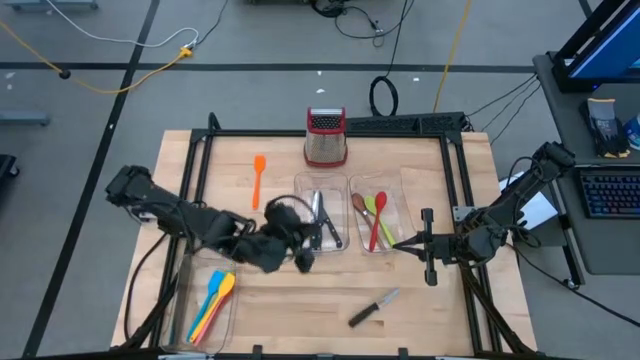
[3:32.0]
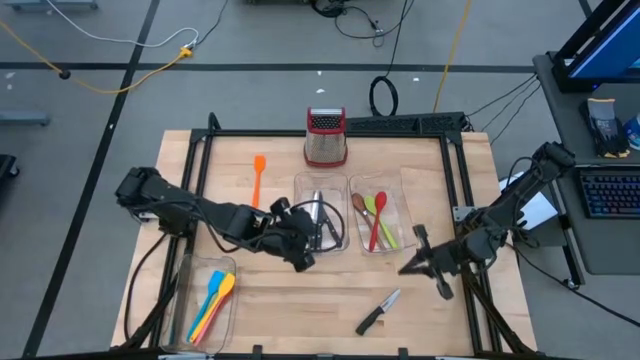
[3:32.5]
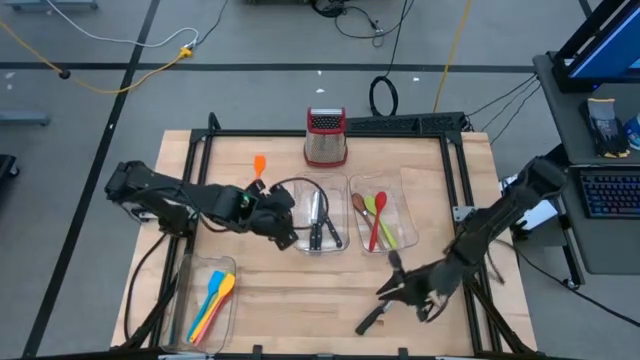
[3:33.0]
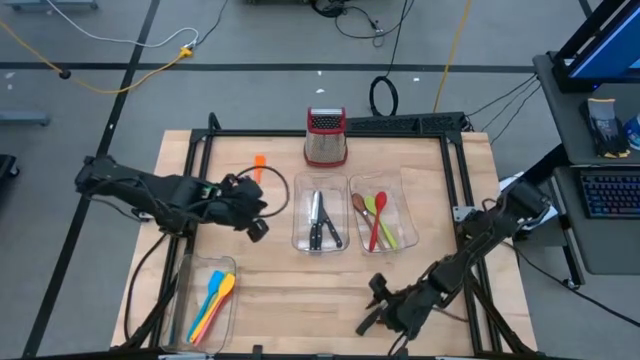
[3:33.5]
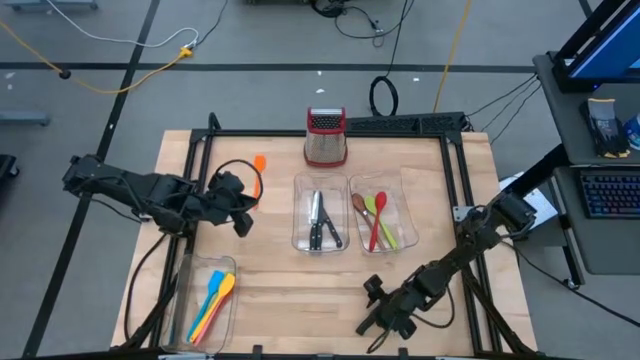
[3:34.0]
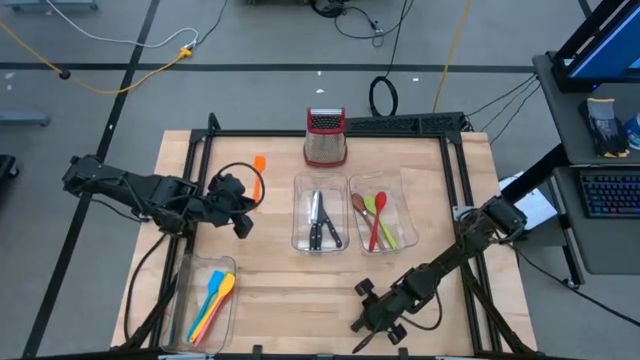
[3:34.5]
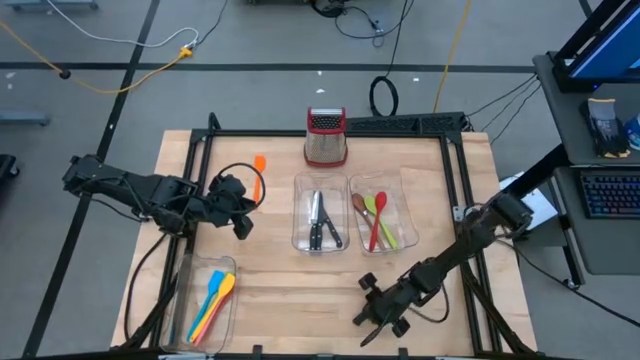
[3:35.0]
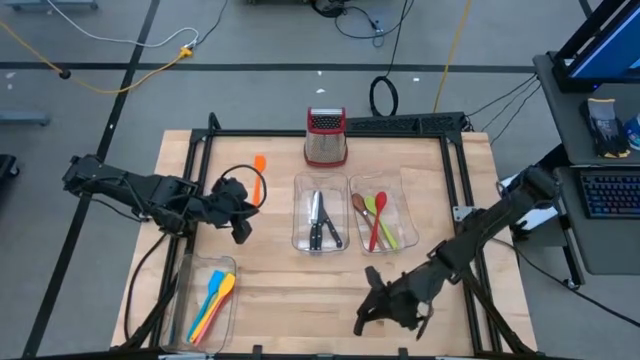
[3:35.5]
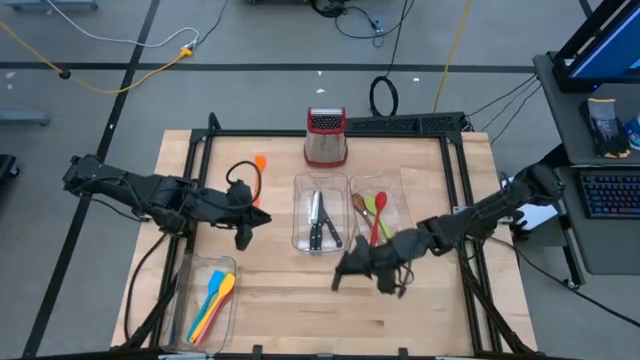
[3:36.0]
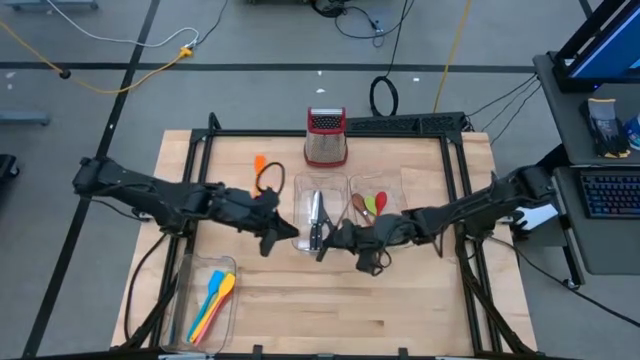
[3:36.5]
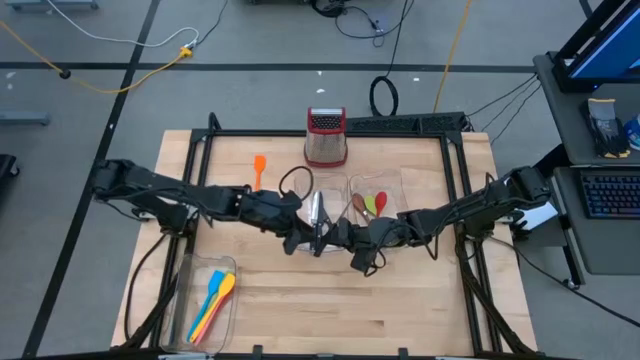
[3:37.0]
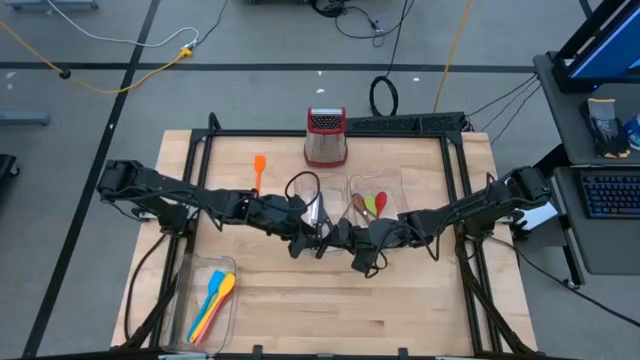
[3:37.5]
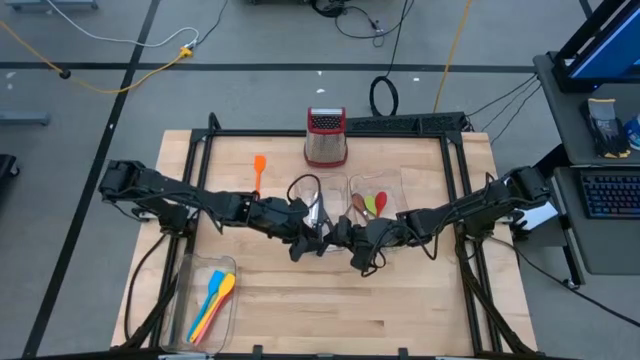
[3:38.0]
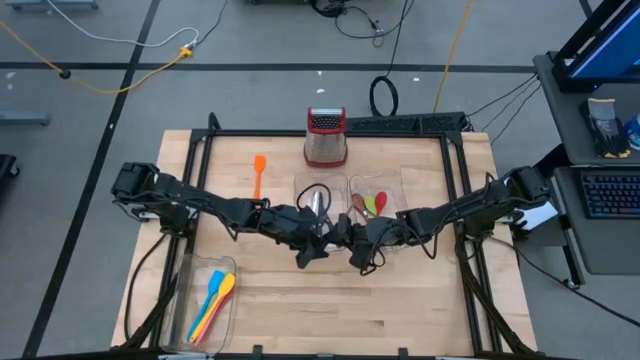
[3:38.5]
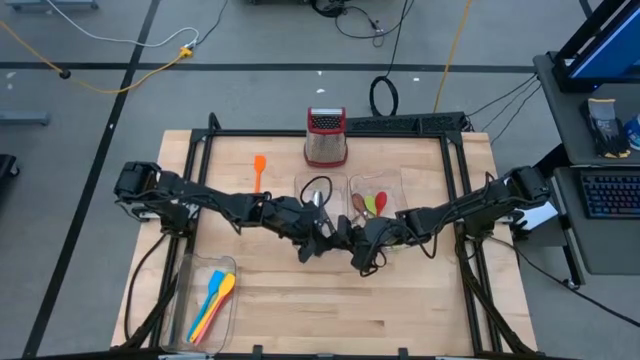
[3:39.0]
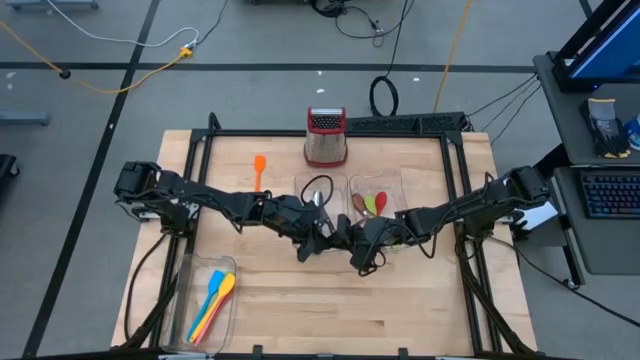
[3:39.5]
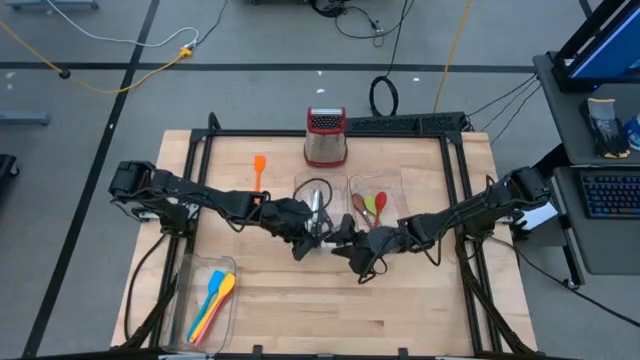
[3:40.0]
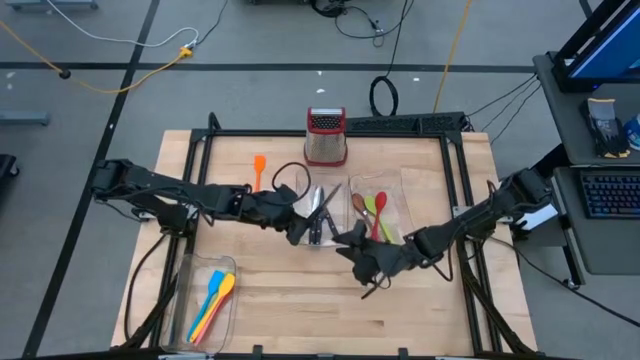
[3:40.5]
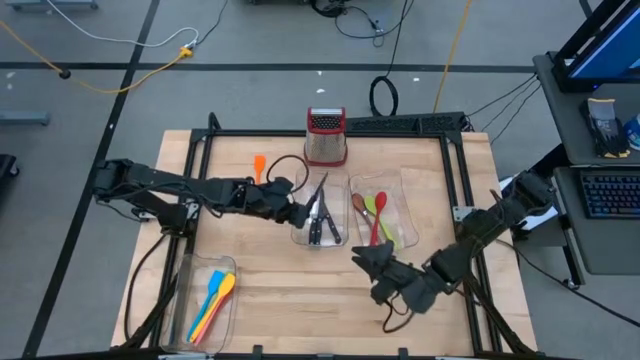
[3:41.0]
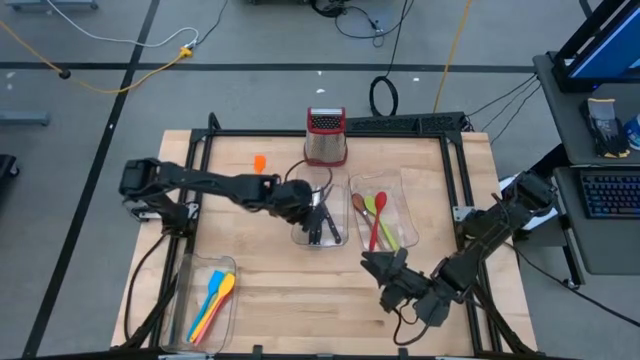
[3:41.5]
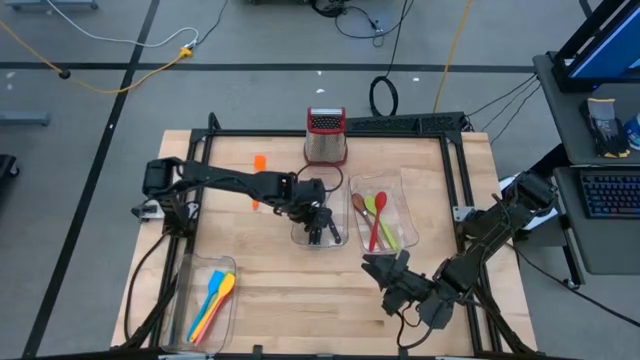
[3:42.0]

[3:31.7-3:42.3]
Task: Pick & Place Kitchen Items
Put the black knife into the middle transparent bin

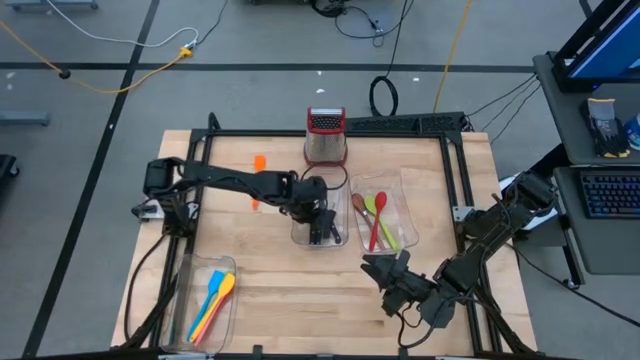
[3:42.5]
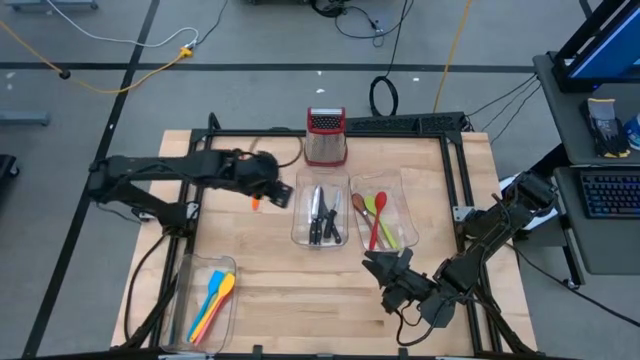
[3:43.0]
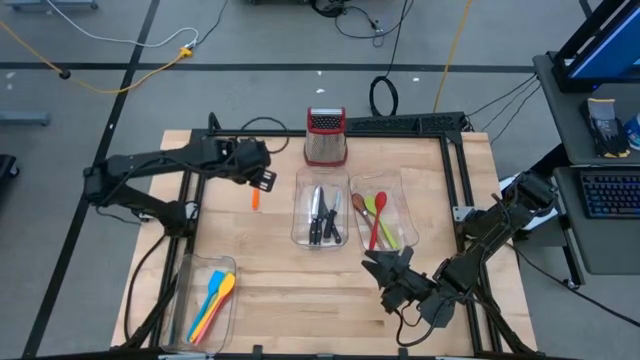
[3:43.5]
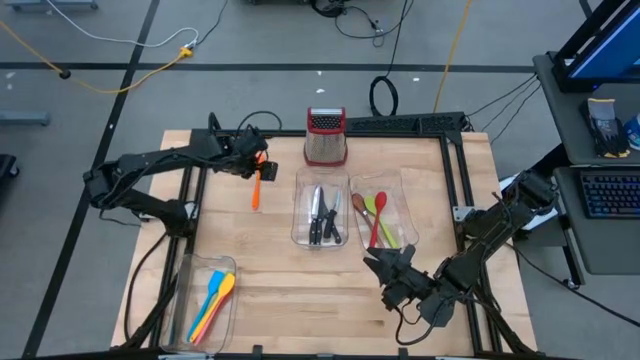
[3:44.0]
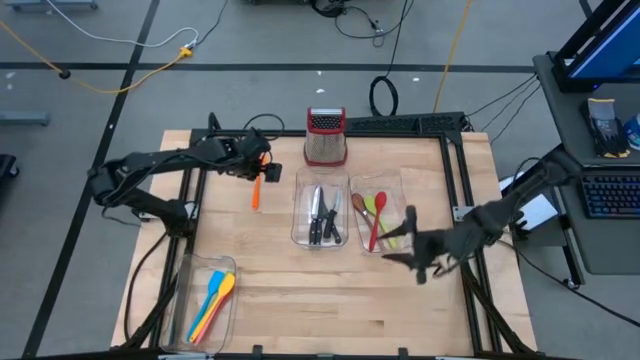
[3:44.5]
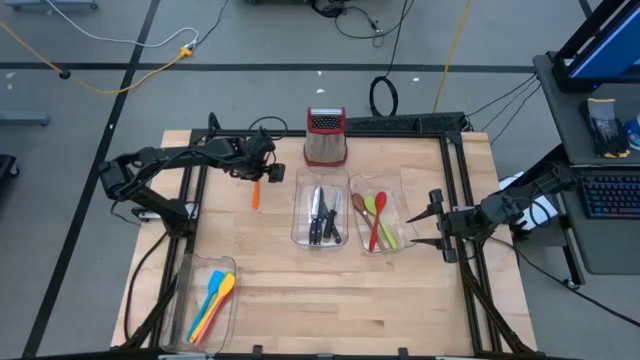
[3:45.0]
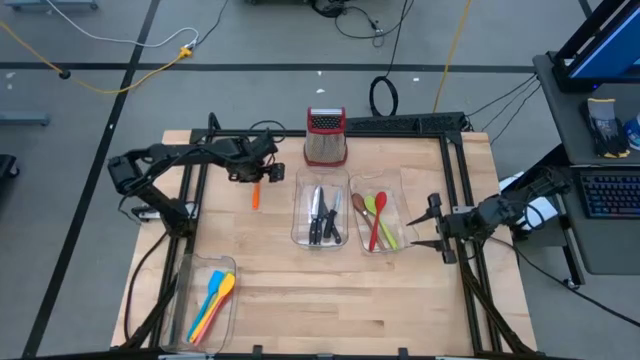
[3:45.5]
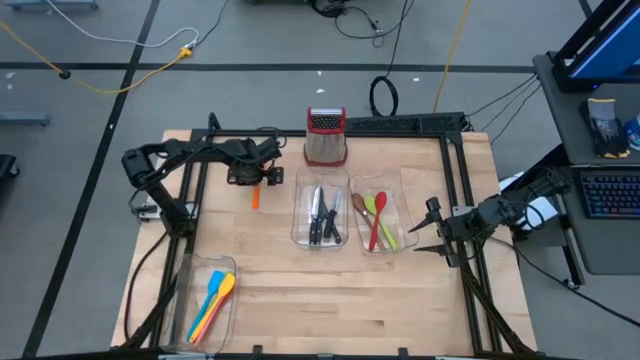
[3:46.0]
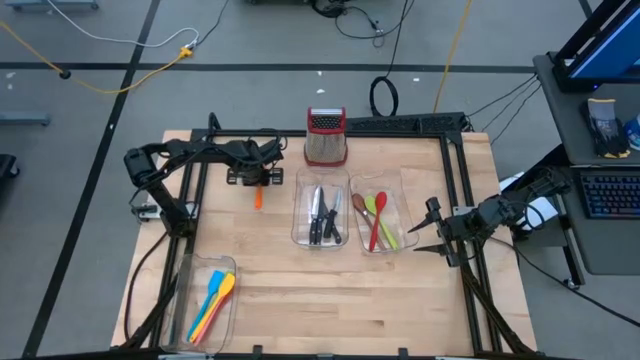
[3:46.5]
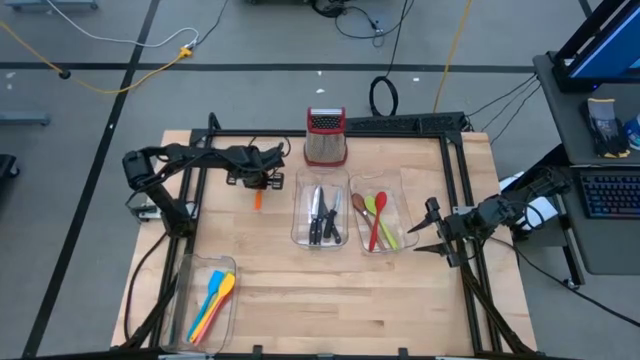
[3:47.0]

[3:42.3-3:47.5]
Put the orange spatula into the left transparent bin

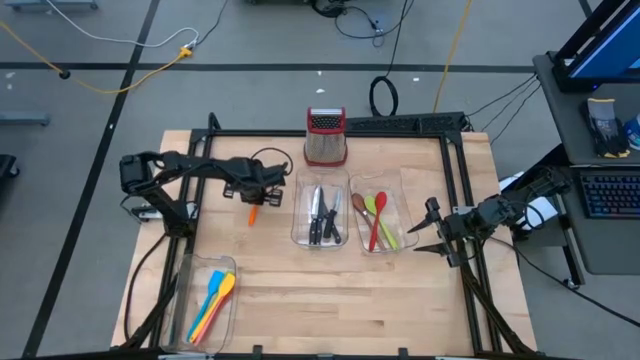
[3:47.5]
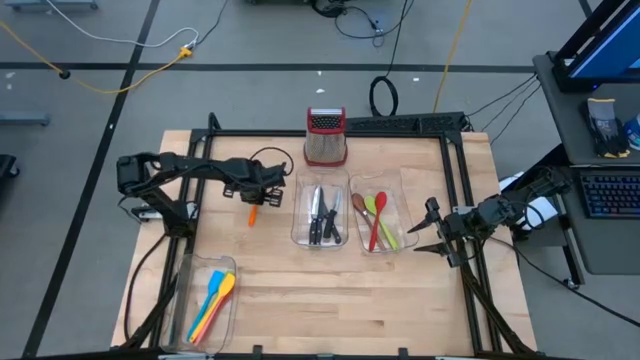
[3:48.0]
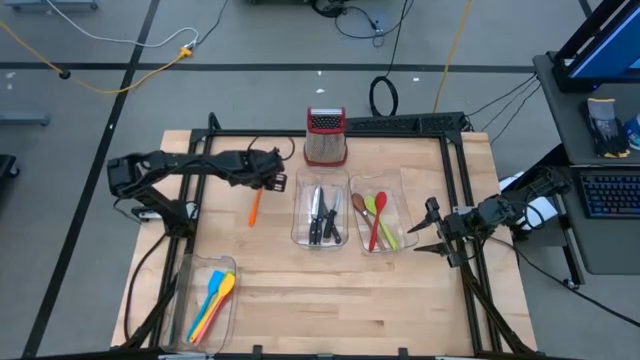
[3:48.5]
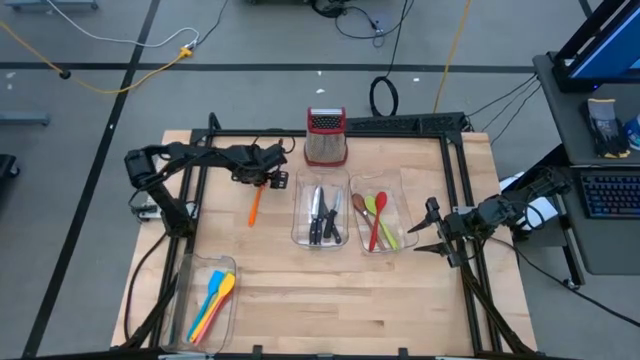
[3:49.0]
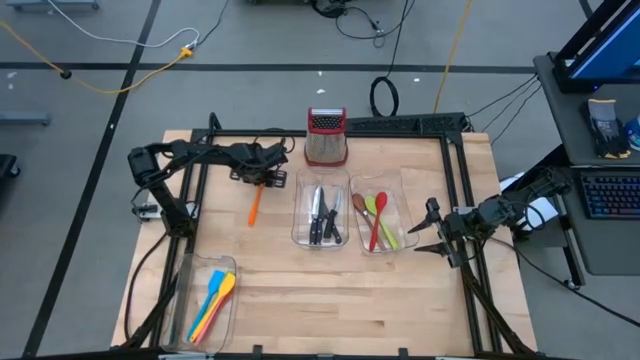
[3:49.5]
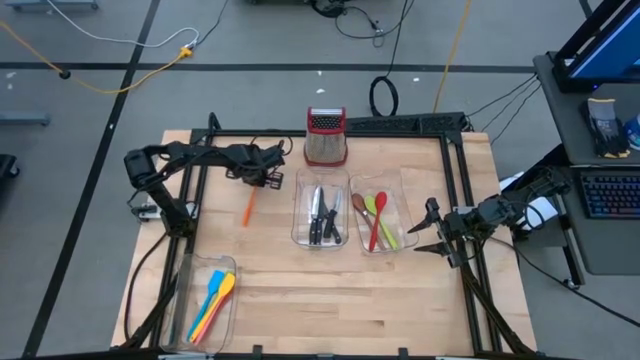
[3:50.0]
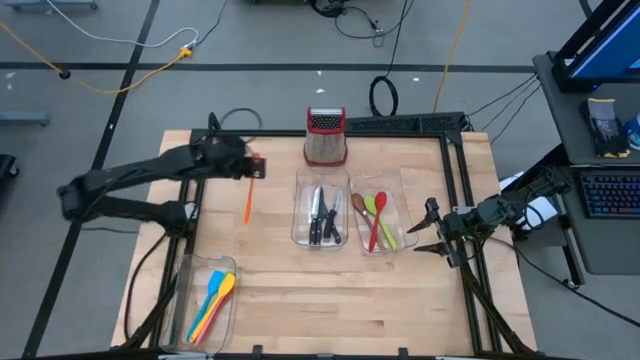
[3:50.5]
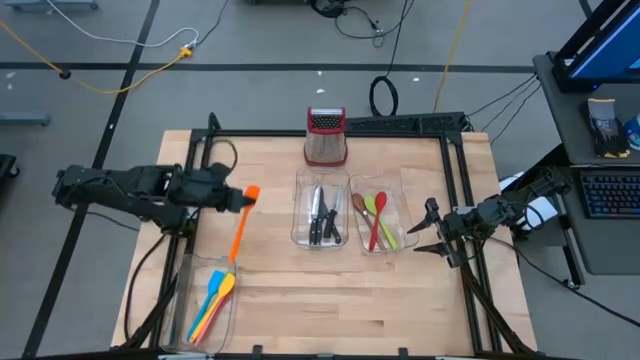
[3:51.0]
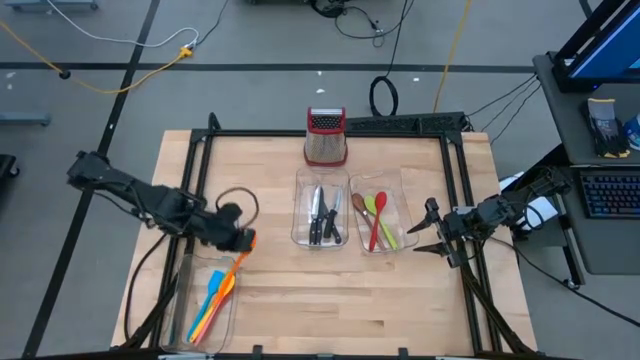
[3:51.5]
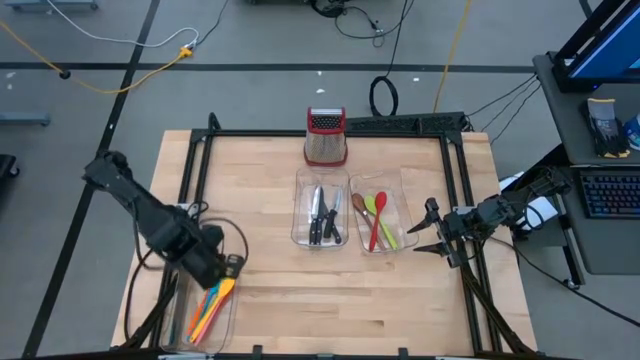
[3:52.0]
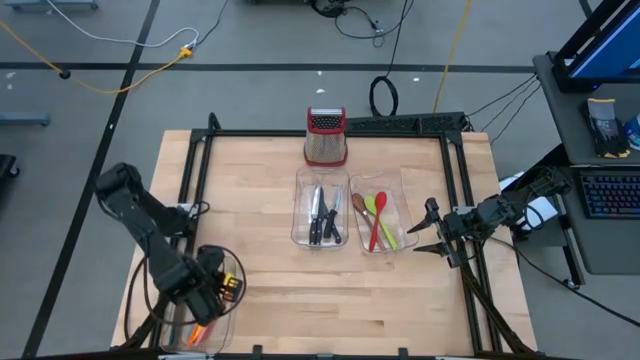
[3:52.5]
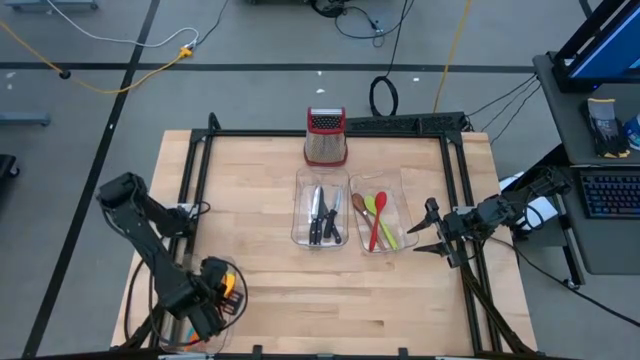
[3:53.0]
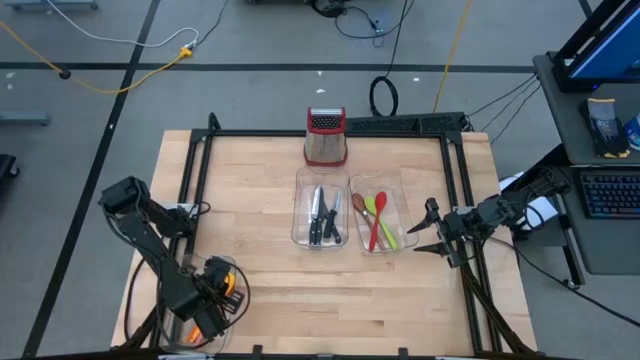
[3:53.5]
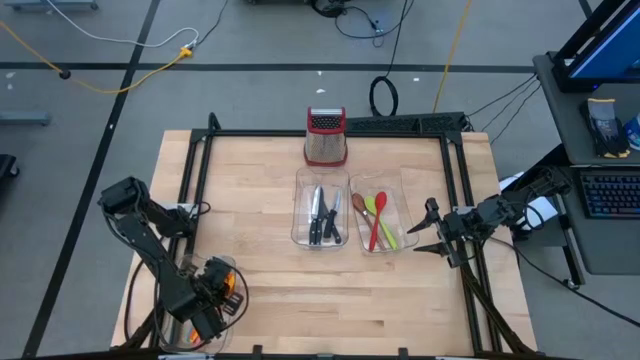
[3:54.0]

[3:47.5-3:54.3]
Put the orange spatula into the left transparent bin
